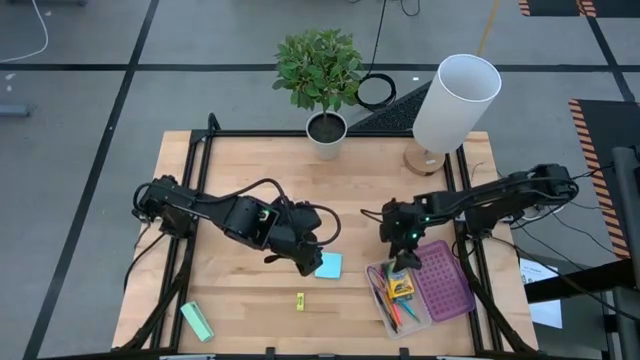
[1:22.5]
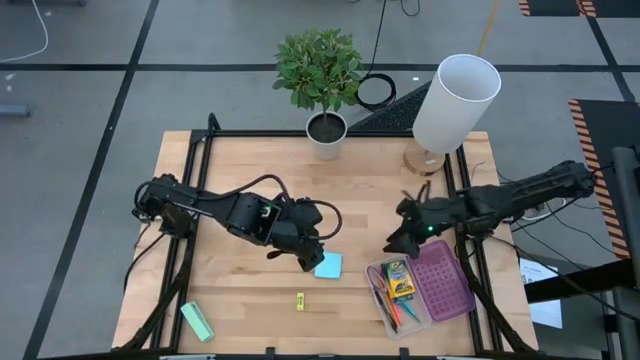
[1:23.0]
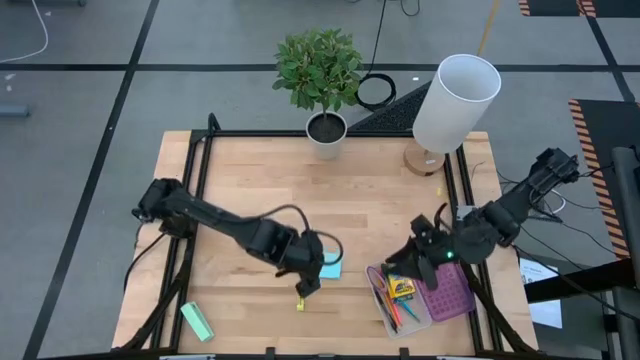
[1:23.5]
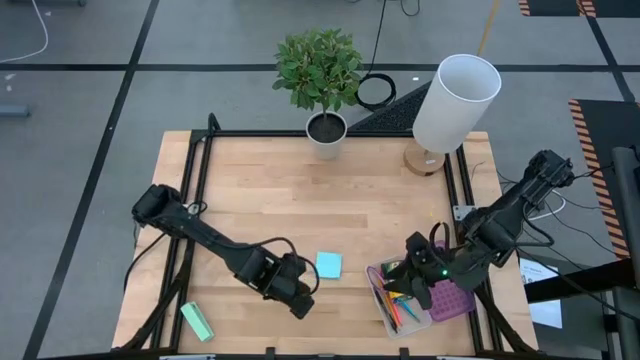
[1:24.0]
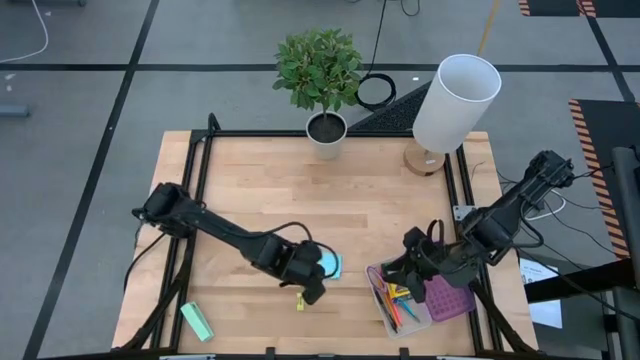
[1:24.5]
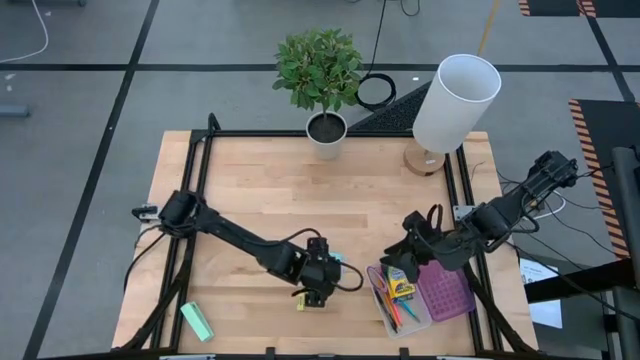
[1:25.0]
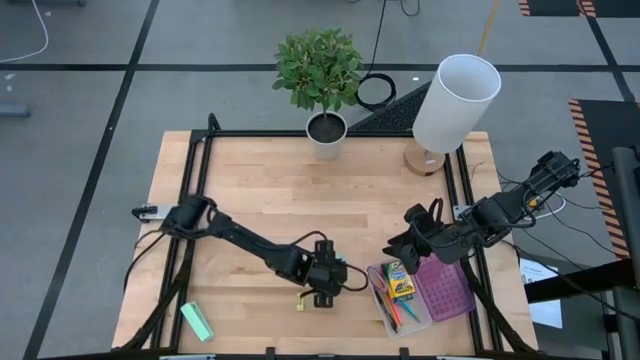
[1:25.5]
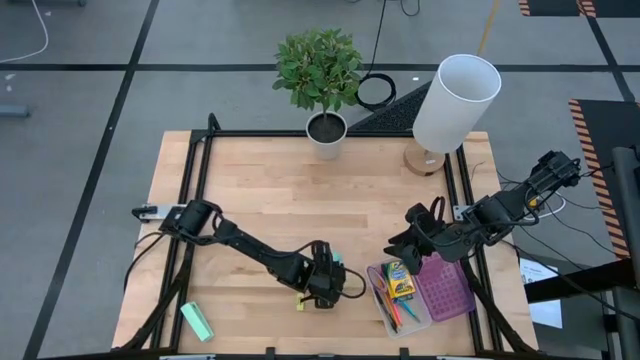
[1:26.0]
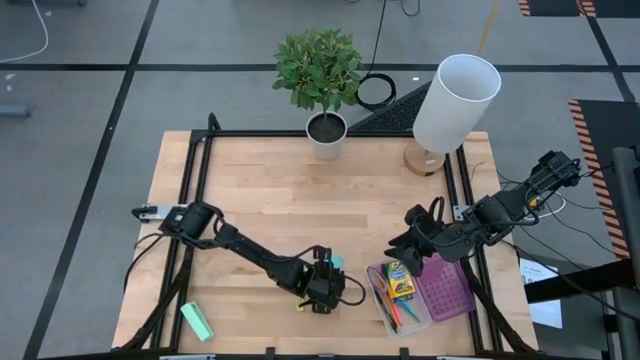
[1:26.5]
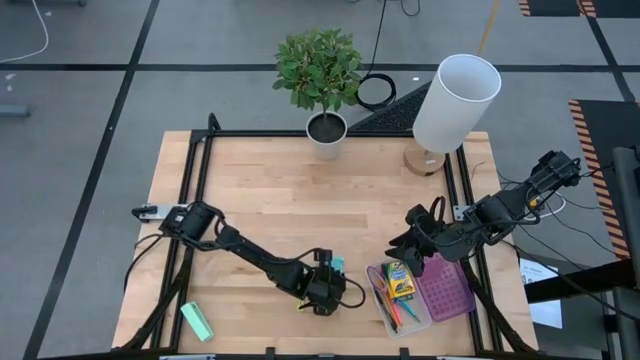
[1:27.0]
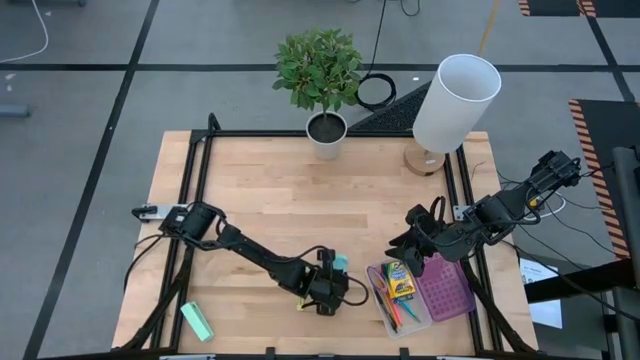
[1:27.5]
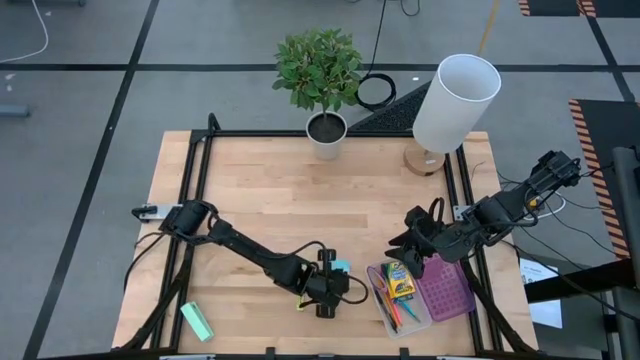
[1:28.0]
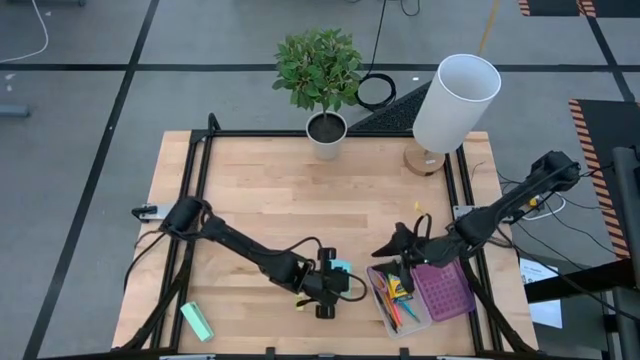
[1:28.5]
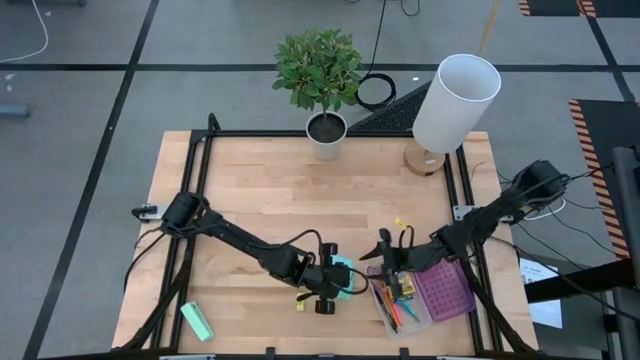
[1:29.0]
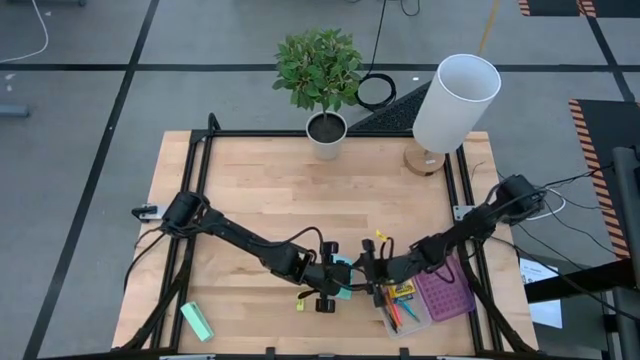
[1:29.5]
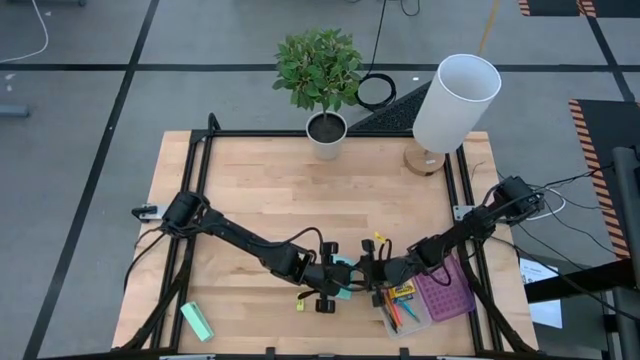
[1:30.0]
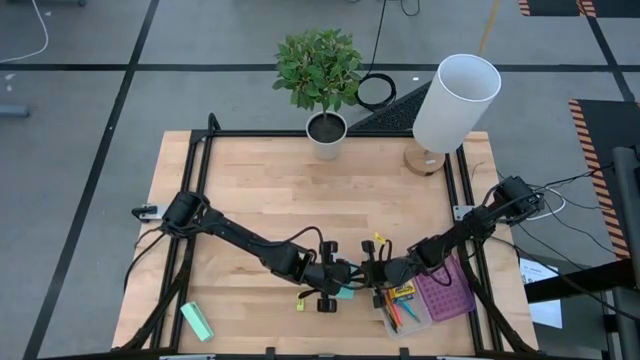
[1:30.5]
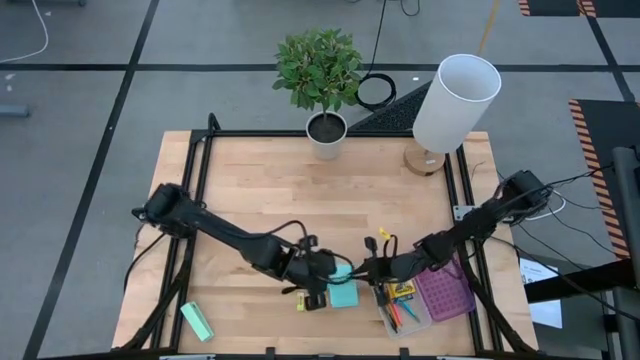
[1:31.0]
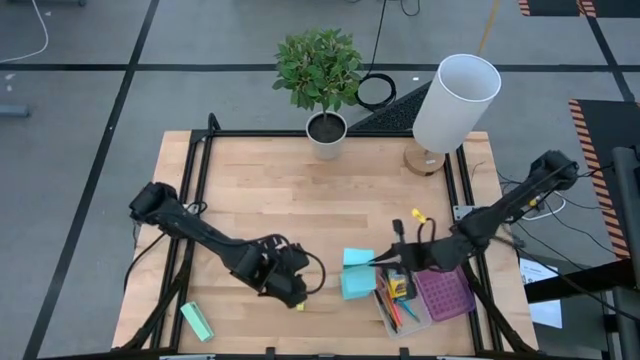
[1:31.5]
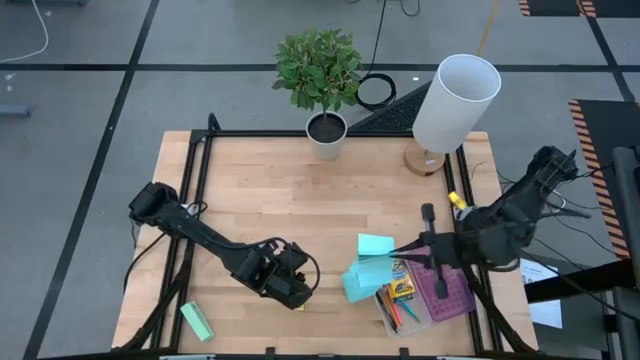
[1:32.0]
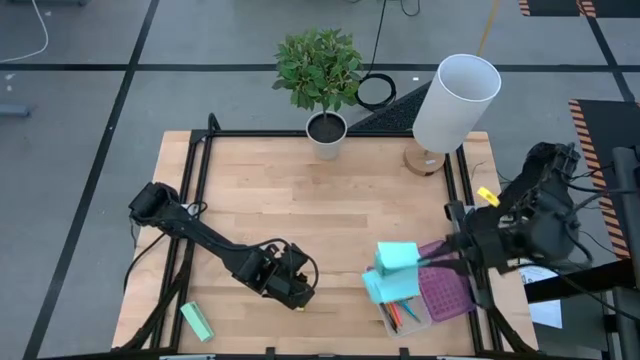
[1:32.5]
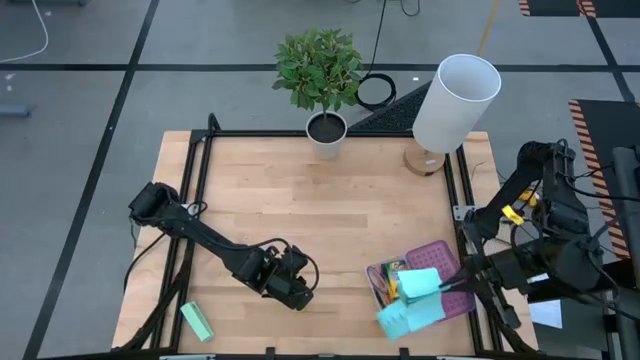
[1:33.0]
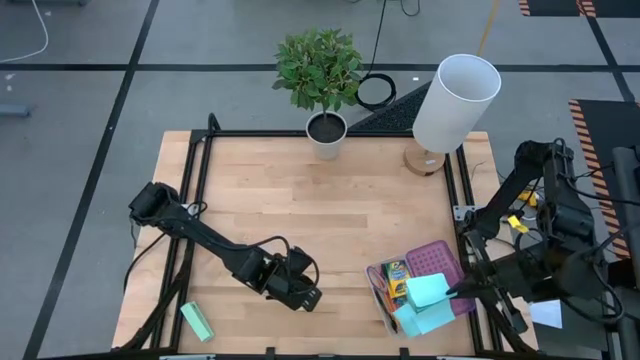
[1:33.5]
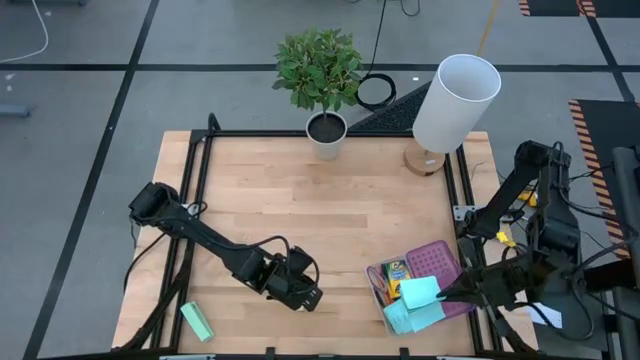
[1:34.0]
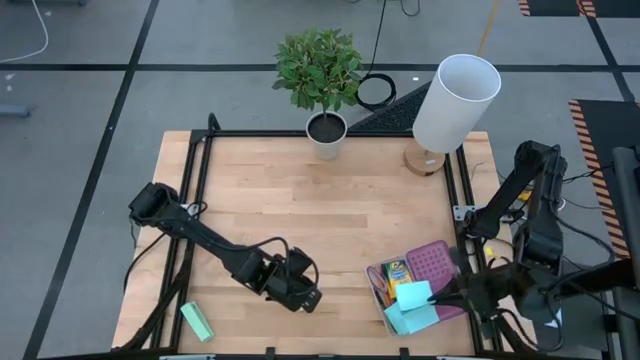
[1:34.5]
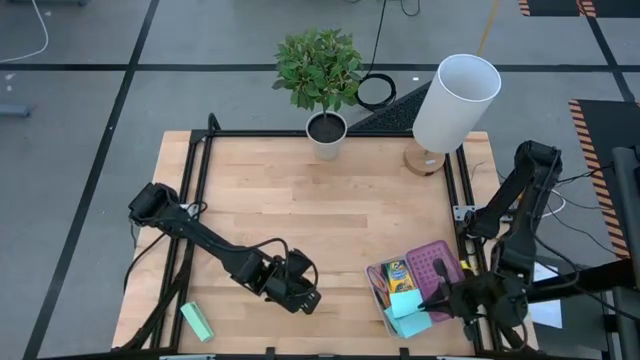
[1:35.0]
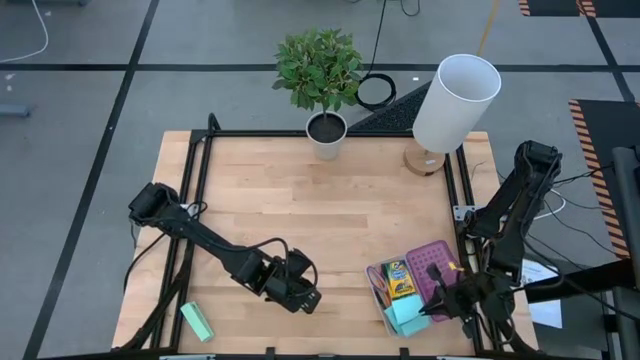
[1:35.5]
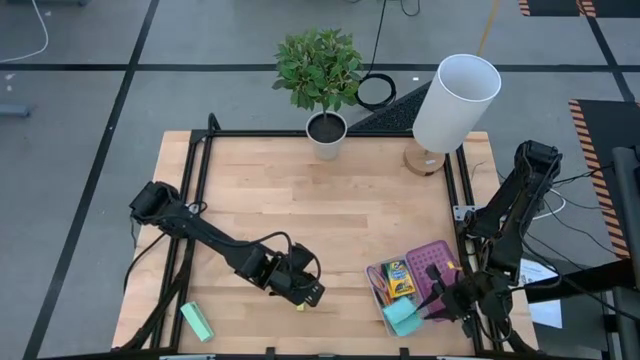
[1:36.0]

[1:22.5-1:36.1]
Task: Pack school essentials
Put the blue sticky notes into the purple supply box
